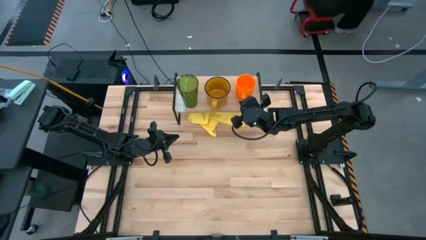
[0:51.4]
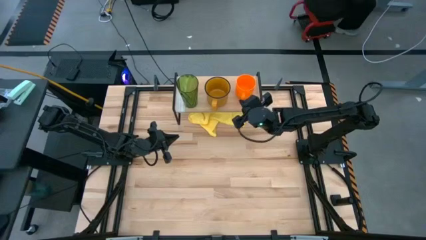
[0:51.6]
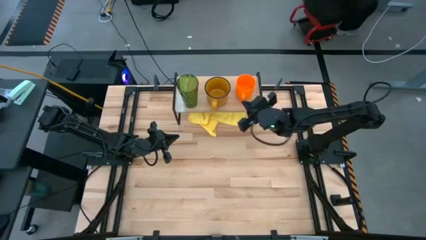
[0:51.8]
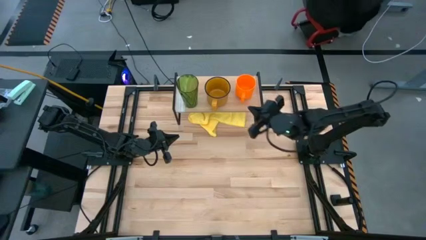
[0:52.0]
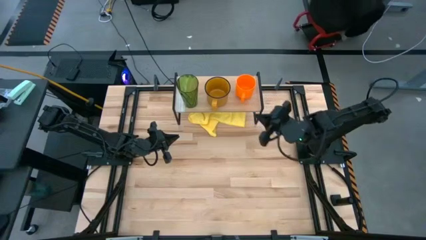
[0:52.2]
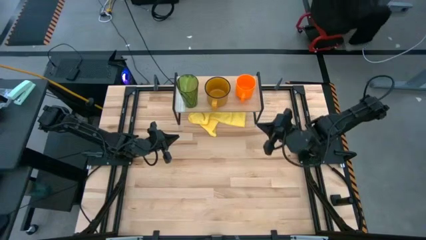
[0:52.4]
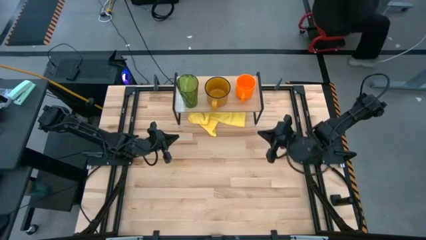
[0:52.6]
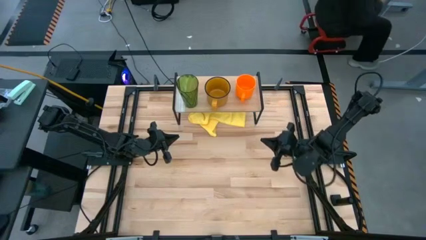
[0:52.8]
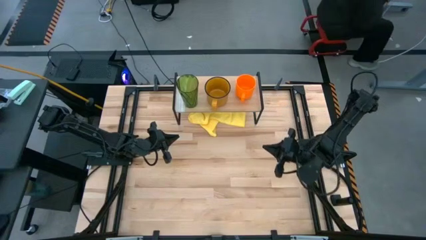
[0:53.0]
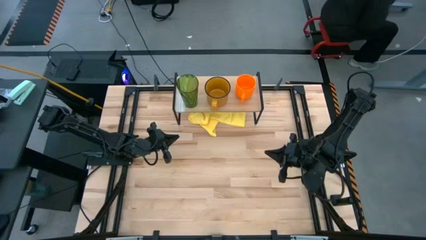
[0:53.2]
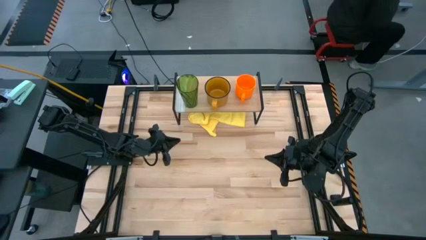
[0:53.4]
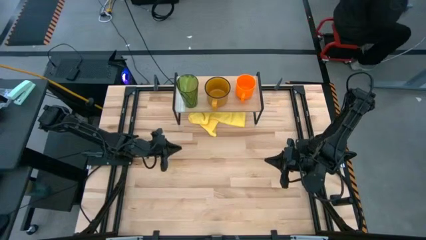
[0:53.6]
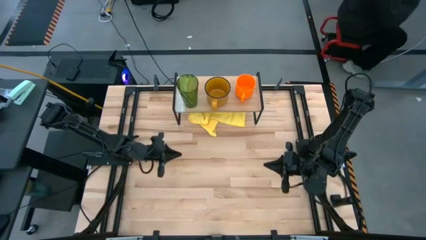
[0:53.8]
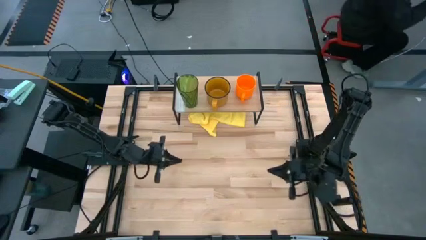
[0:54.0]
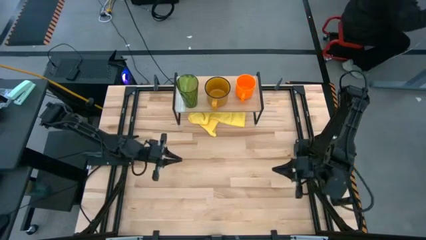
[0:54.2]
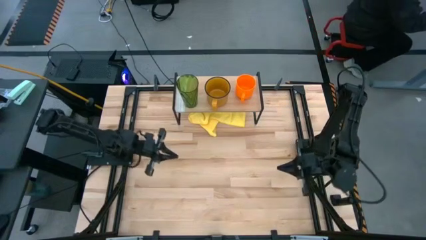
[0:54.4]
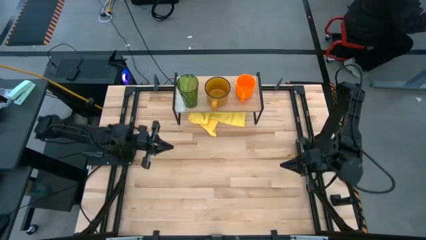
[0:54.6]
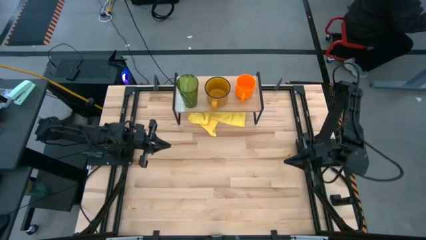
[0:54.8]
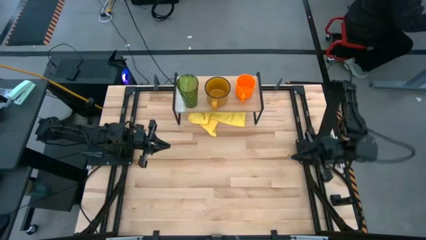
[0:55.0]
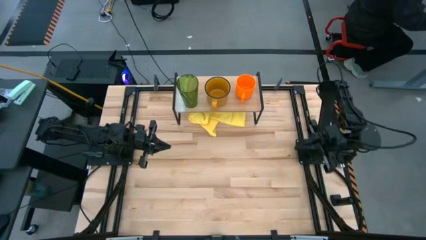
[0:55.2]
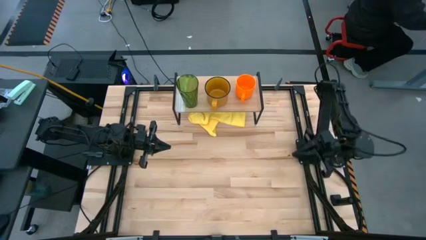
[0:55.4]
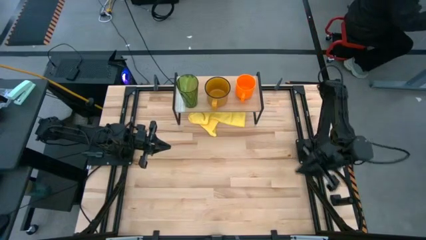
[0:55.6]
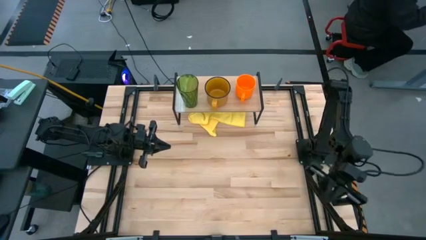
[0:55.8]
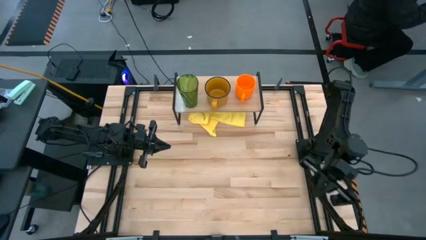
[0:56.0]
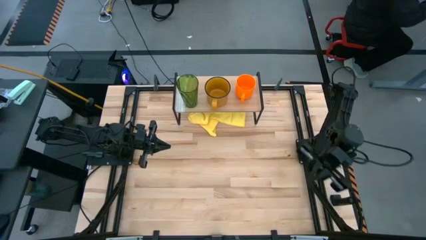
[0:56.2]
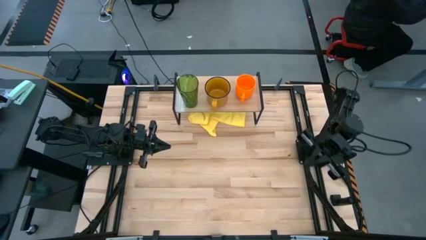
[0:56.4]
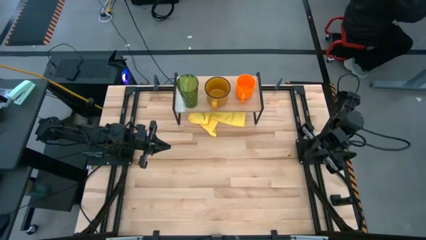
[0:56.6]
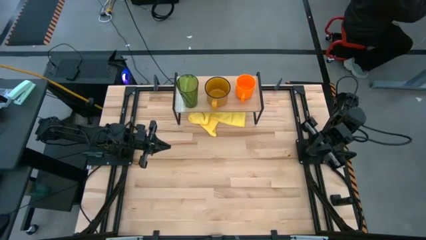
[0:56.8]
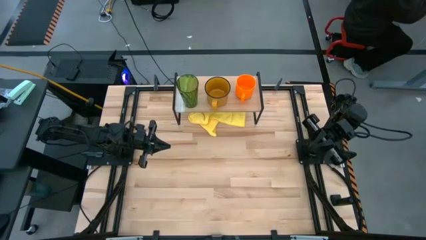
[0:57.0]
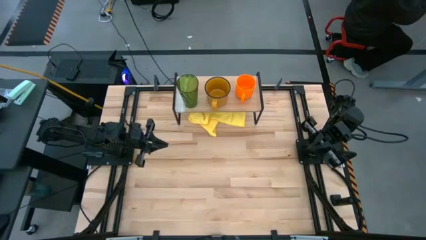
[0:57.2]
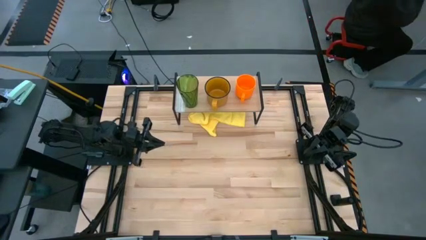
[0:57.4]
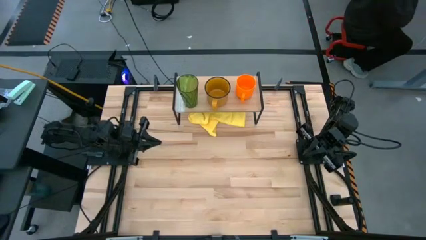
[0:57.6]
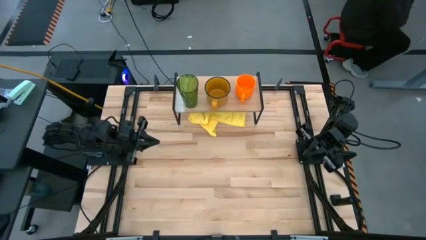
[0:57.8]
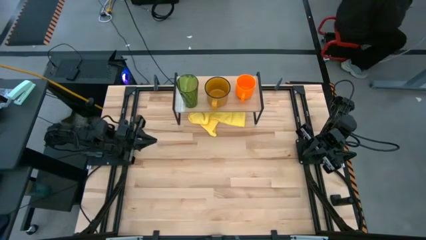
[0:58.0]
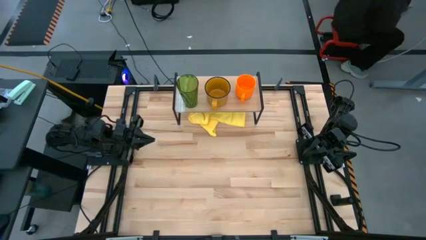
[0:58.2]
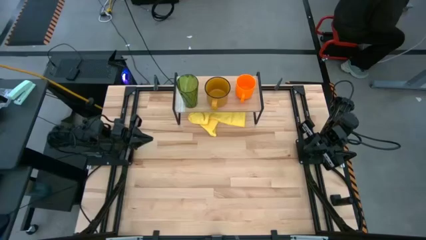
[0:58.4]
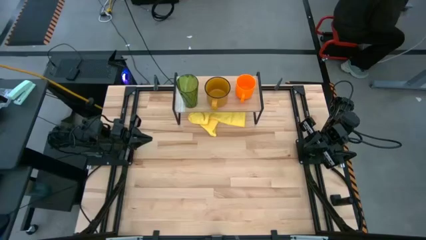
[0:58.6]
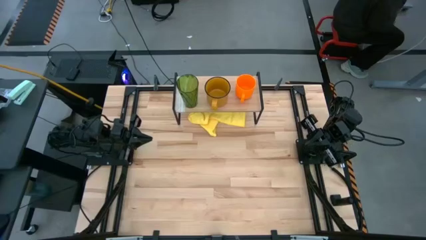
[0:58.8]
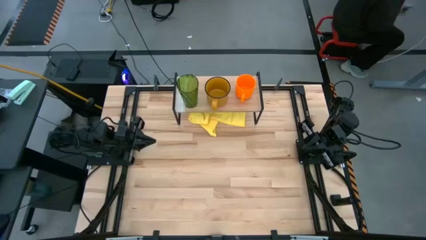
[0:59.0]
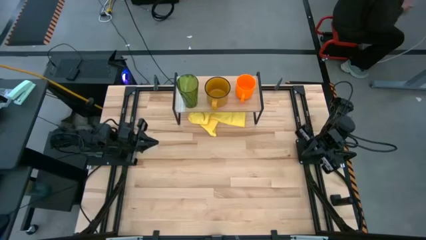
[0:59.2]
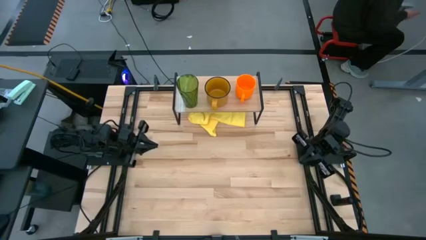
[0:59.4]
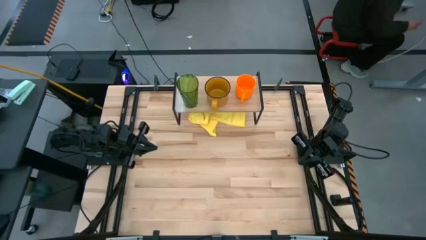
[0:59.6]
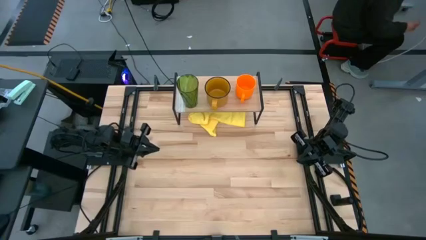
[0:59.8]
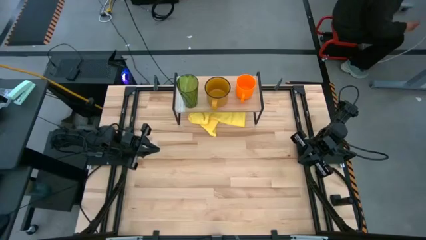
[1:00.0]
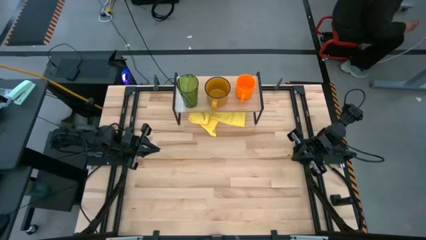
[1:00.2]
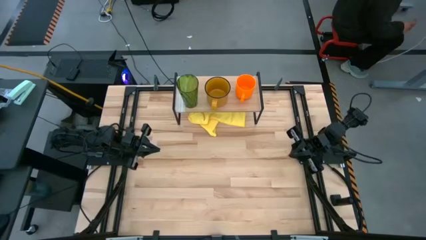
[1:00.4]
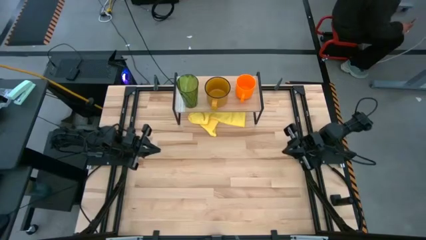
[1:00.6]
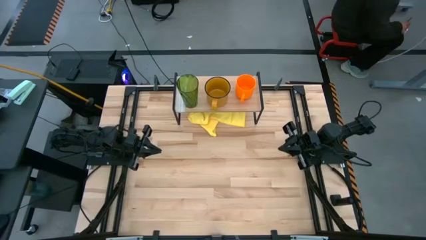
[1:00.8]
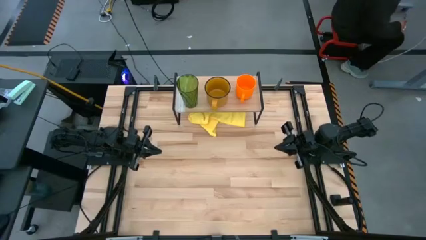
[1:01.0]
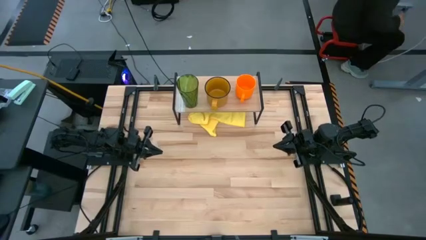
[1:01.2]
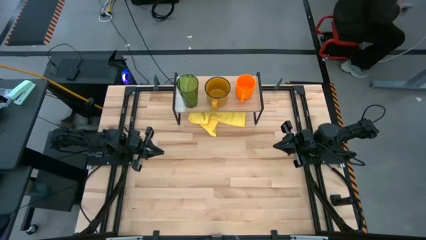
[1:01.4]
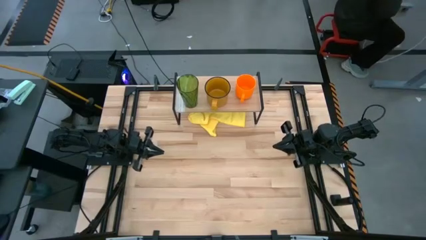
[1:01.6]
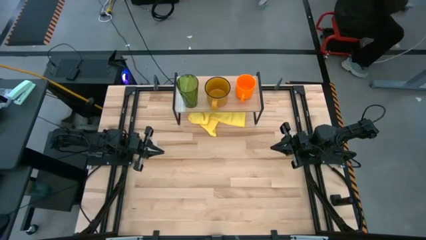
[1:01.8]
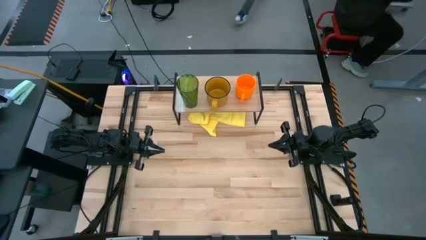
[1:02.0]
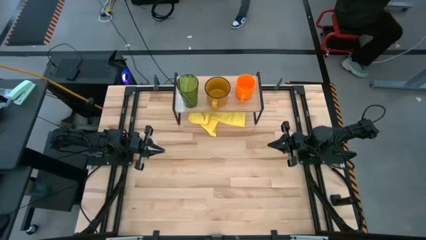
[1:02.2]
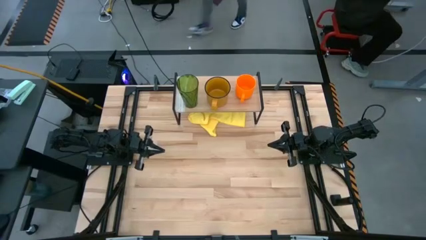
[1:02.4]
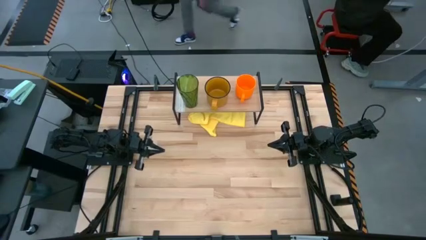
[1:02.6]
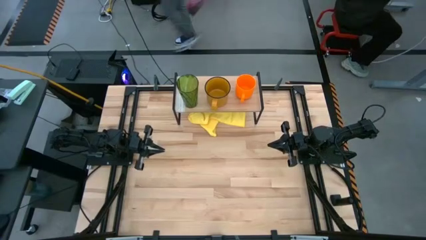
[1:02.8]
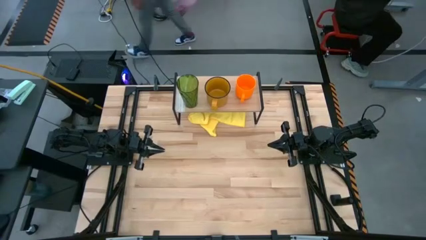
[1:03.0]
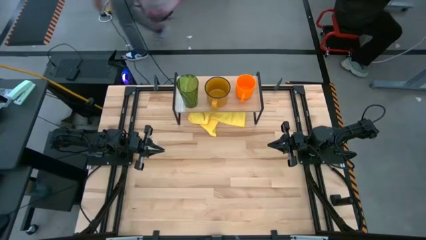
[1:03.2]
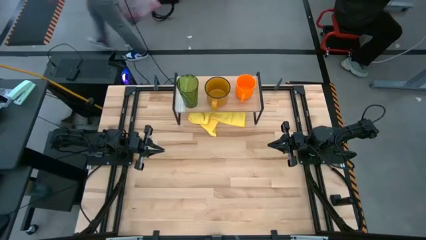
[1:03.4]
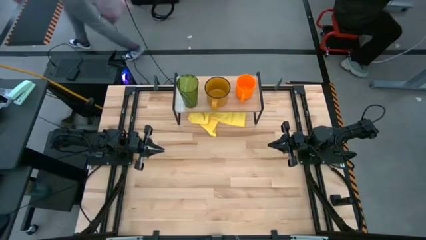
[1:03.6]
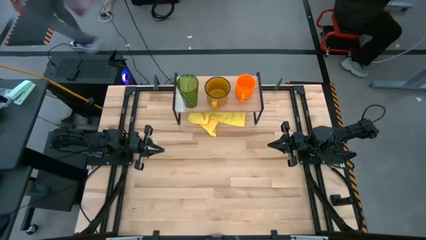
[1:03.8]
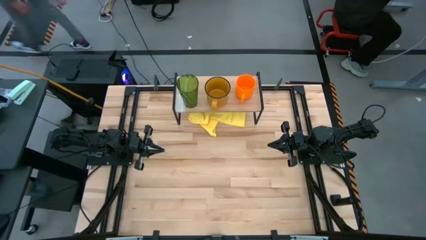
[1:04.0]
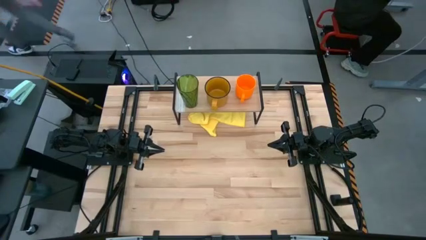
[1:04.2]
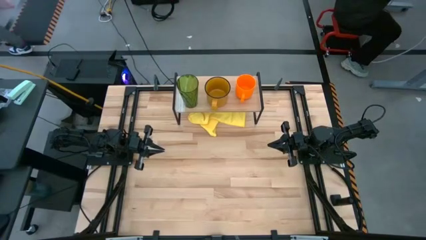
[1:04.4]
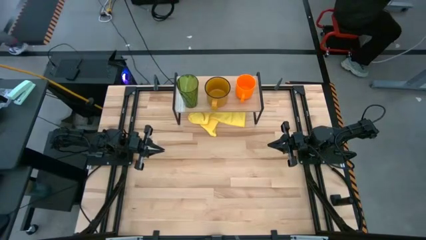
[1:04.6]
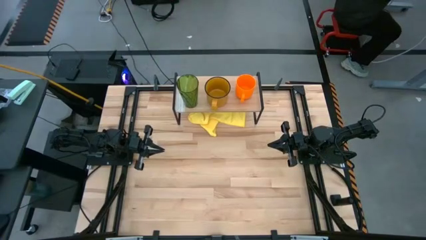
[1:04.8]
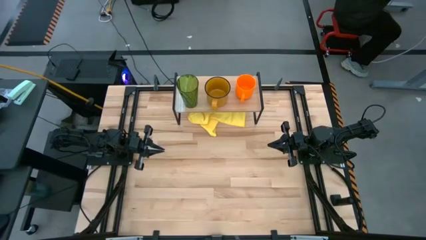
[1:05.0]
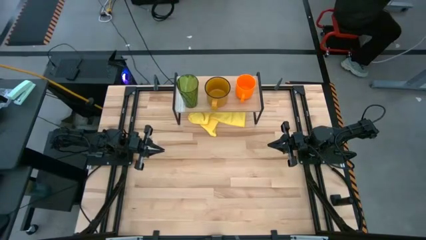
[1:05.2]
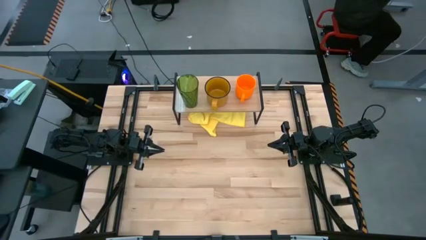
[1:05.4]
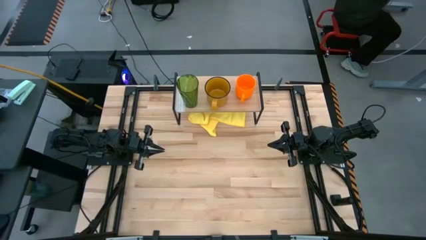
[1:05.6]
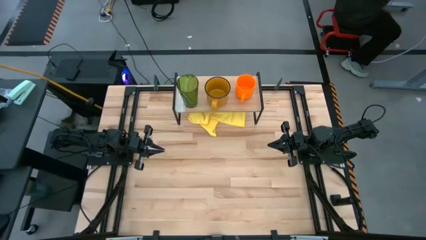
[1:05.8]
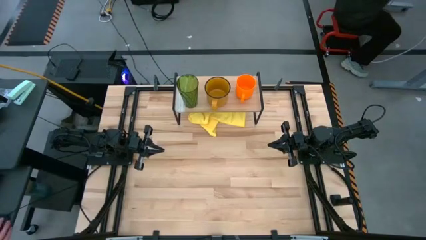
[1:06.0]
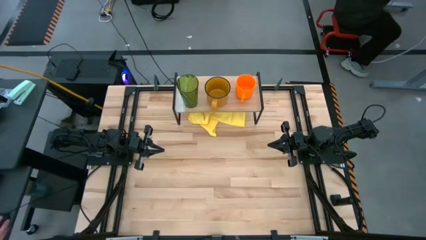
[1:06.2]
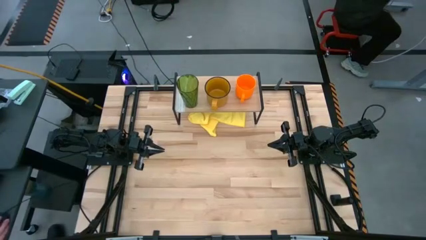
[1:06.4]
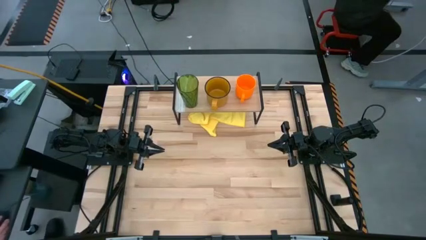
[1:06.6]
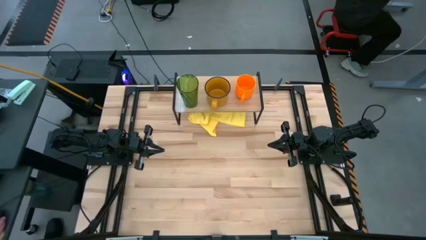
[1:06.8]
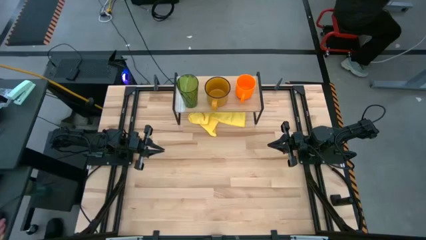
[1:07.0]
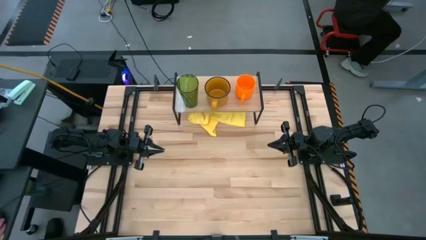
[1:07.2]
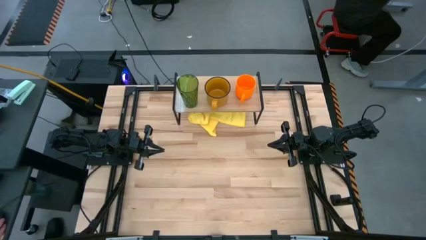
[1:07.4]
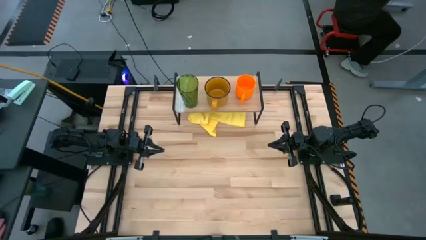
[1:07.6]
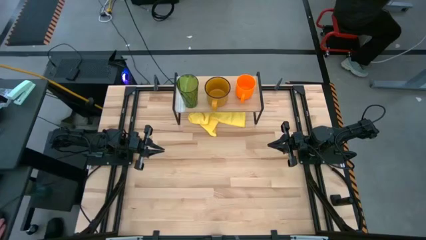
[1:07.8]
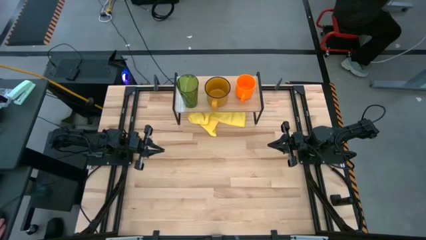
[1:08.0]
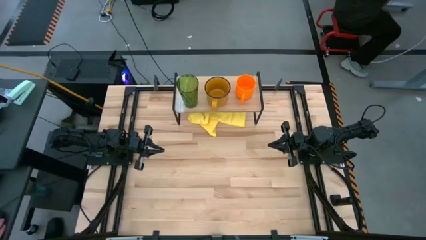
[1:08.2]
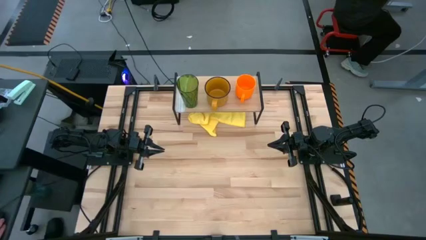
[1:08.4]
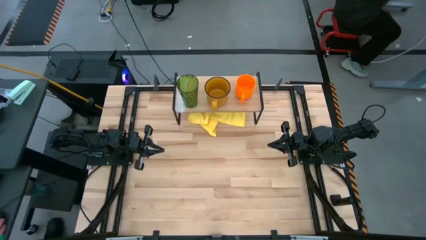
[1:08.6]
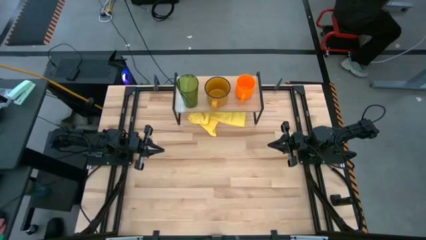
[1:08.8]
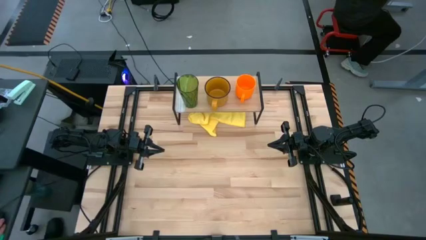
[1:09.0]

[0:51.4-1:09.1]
Task: Stack small to large cups/mugs on shelf
Return to Home Position
